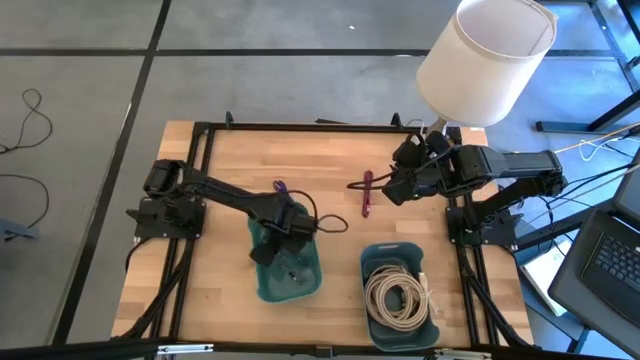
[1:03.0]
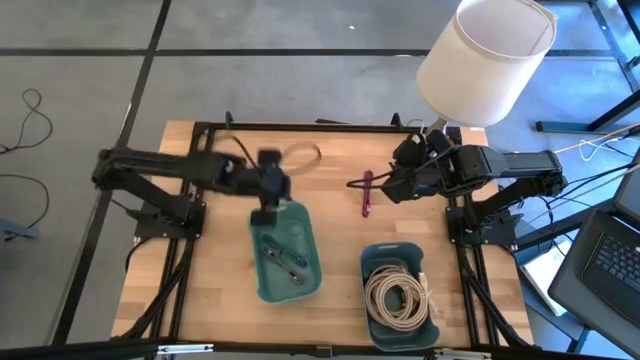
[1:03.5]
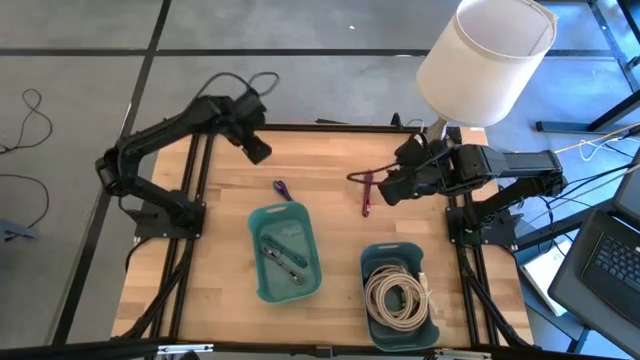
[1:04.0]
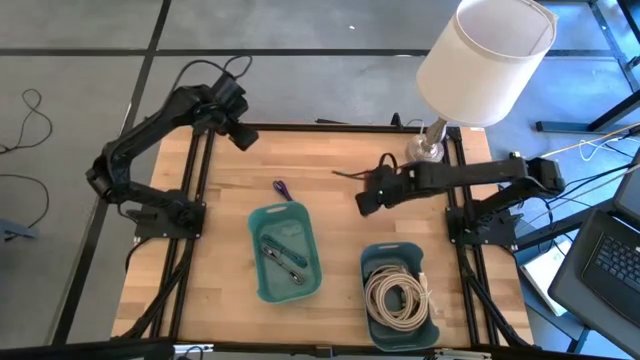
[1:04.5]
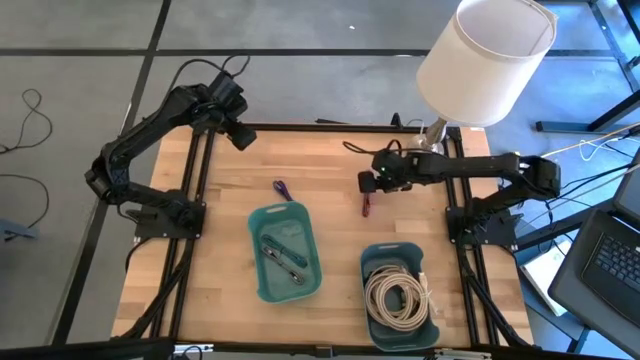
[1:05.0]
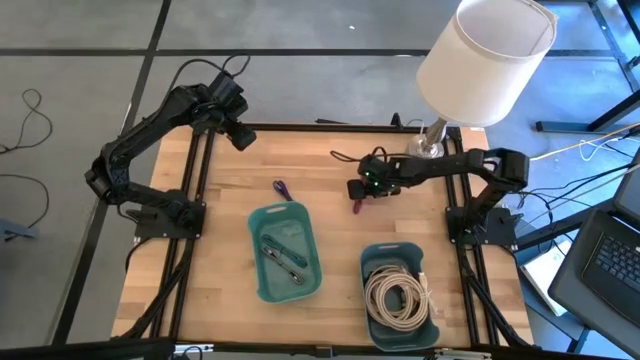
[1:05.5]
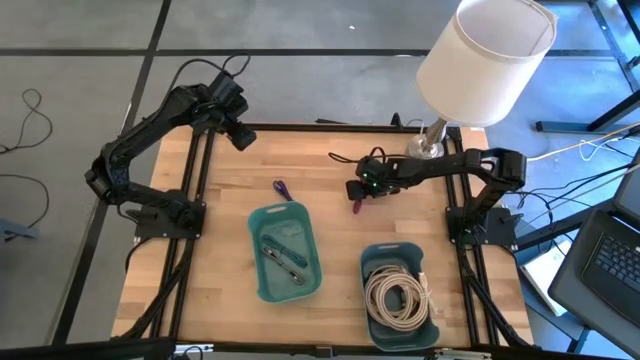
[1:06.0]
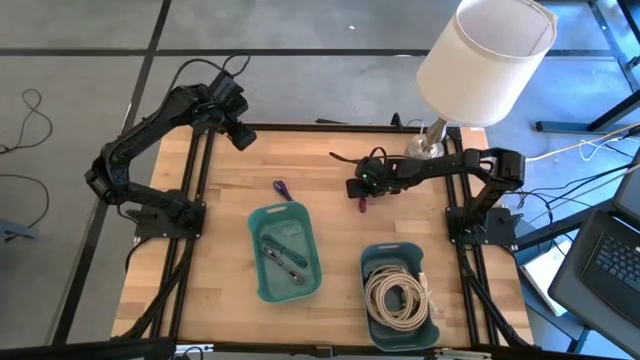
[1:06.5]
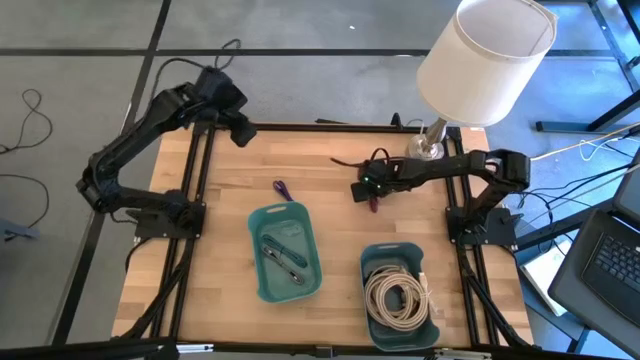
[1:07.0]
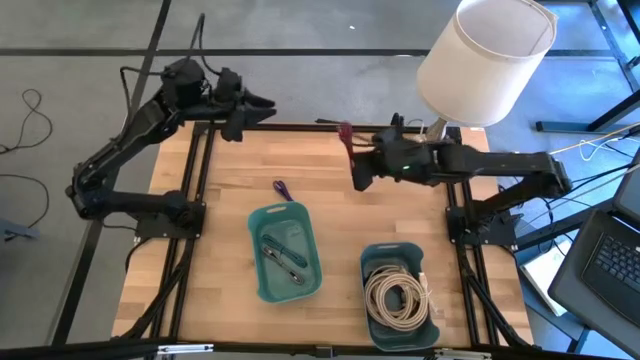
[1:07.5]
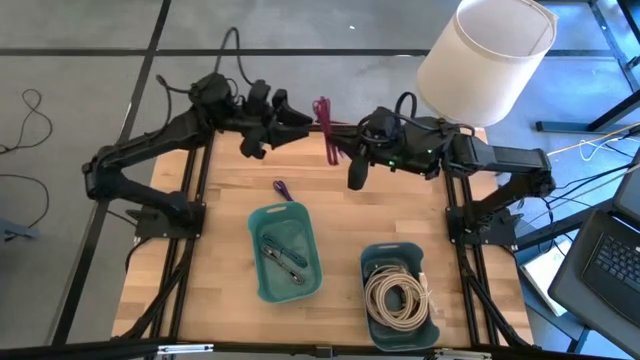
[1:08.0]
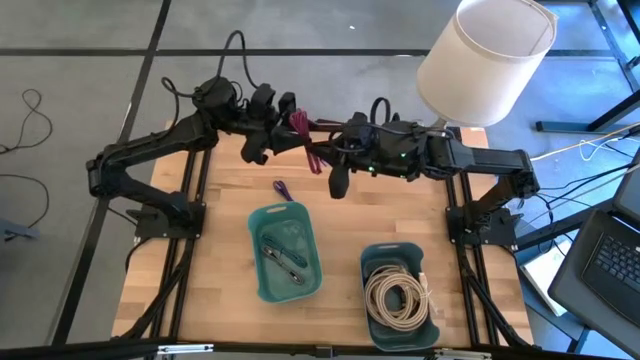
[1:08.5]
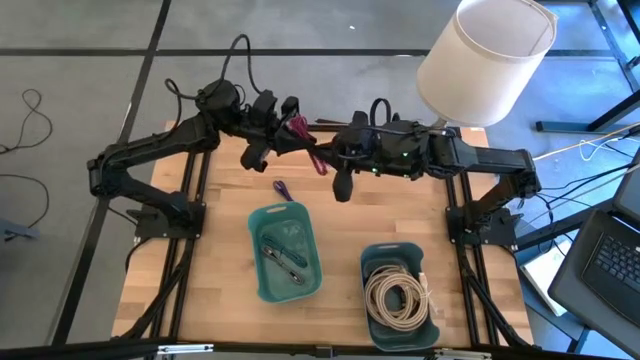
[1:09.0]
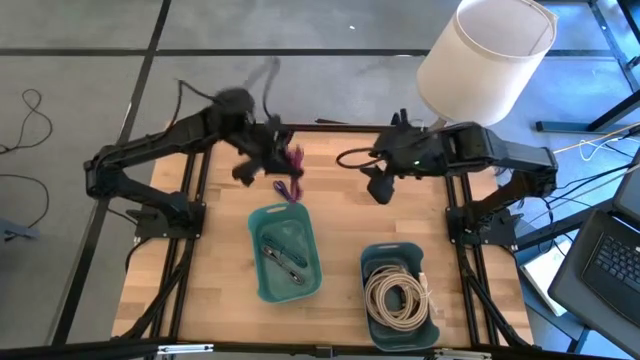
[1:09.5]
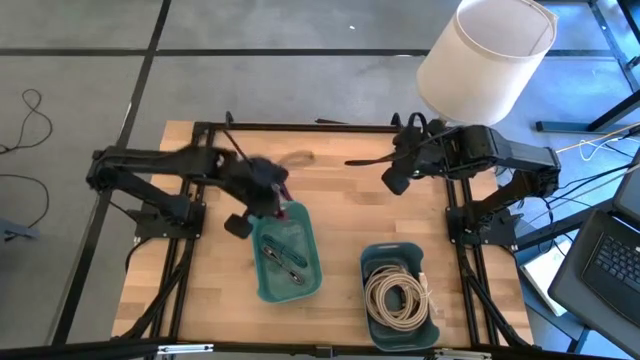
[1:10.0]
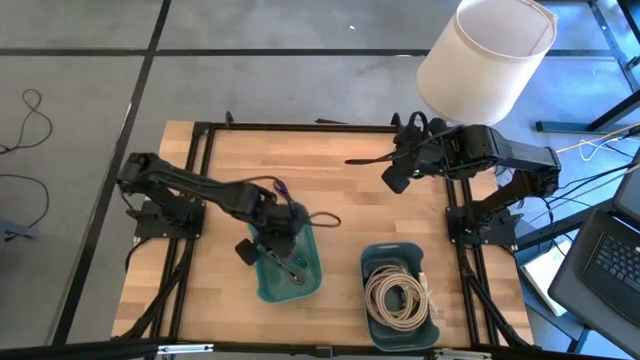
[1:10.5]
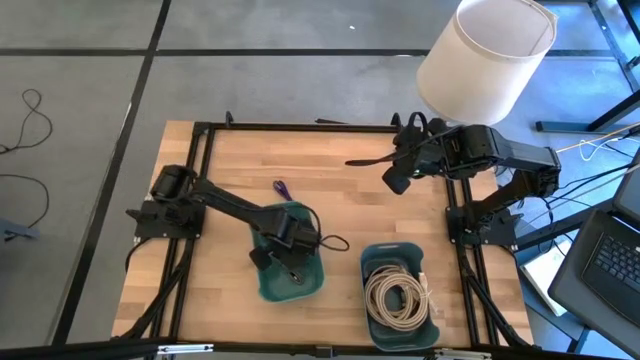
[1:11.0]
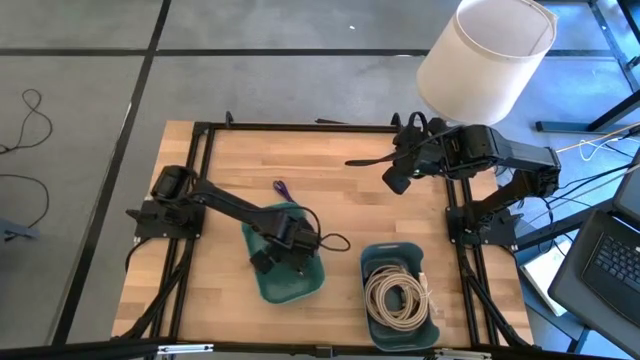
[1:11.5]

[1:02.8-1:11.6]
Task: Pick and place USB-C Cables
Put the black and pink USB cable into the green bin

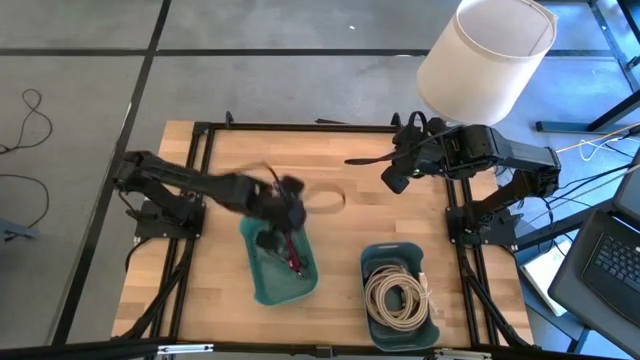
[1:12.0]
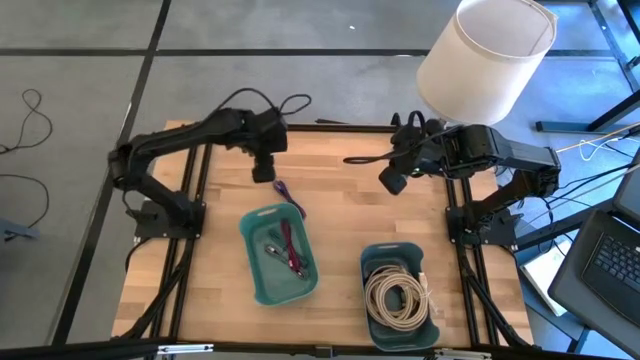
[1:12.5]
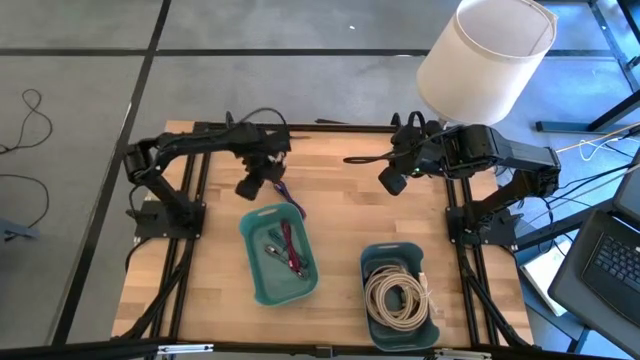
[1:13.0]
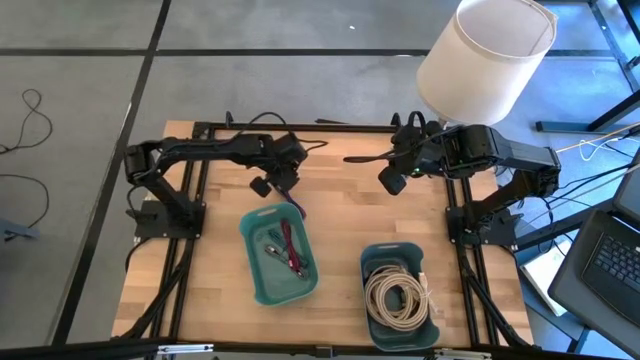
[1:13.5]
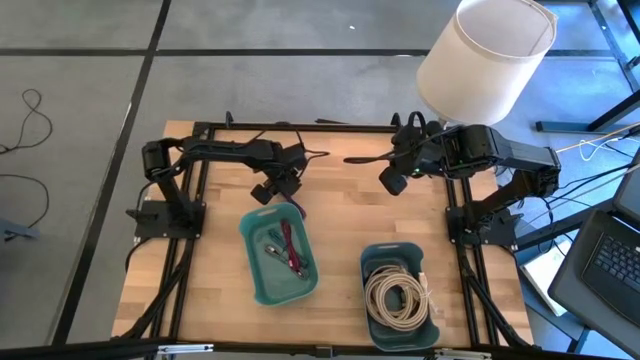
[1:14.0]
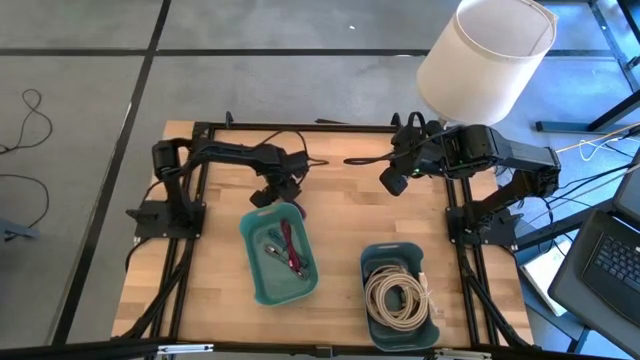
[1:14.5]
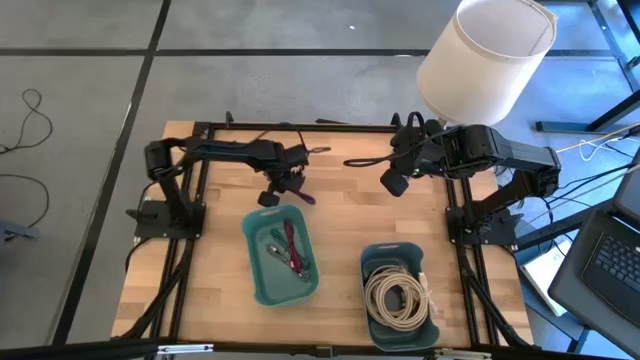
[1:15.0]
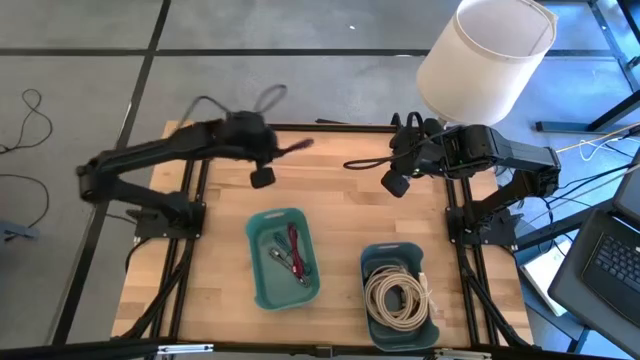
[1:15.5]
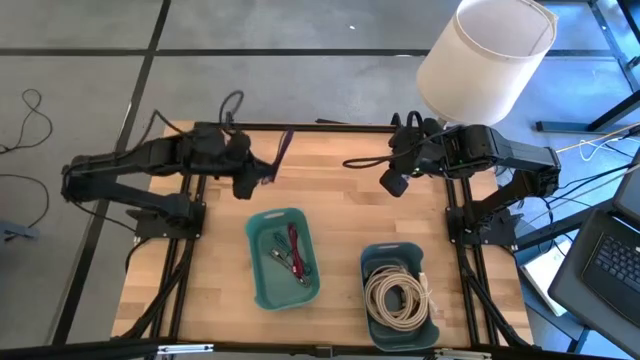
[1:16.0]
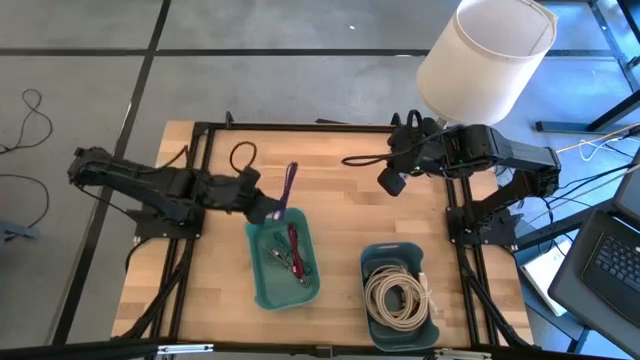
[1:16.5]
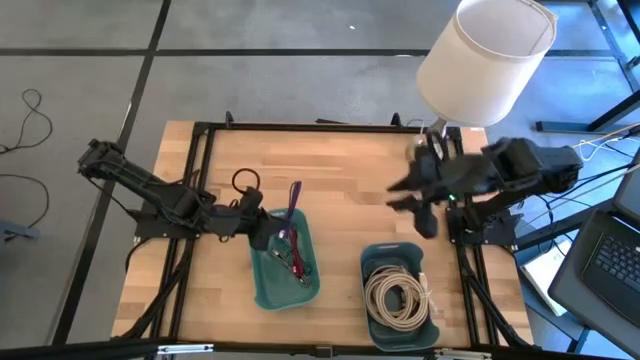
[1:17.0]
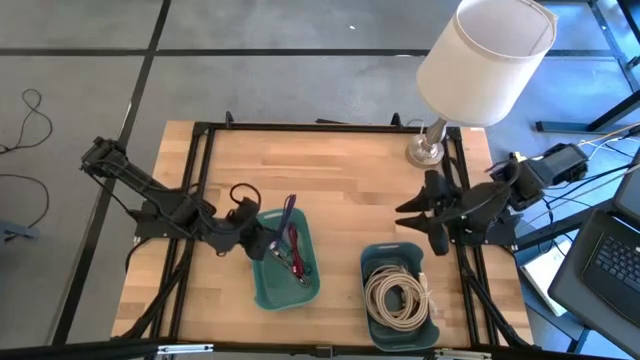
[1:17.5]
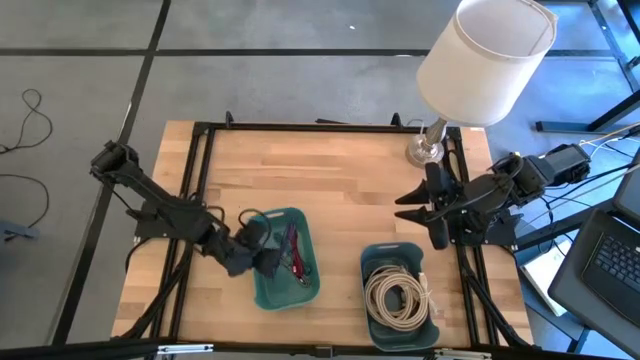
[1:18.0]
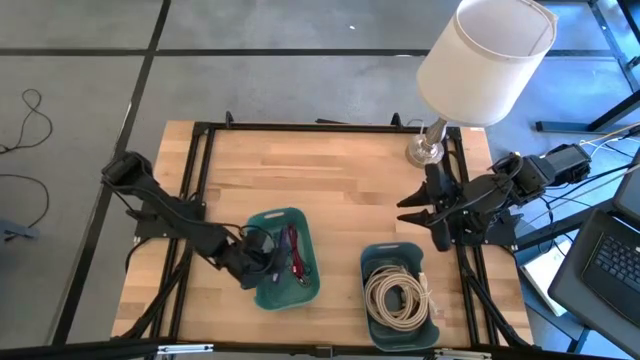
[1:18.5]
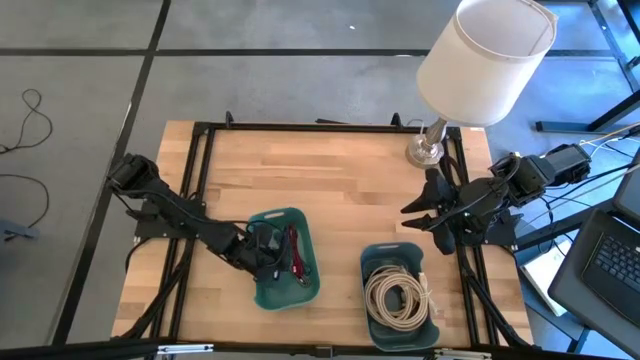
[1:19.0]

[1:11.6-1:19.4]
Put the black and violet USB cable into the green bin

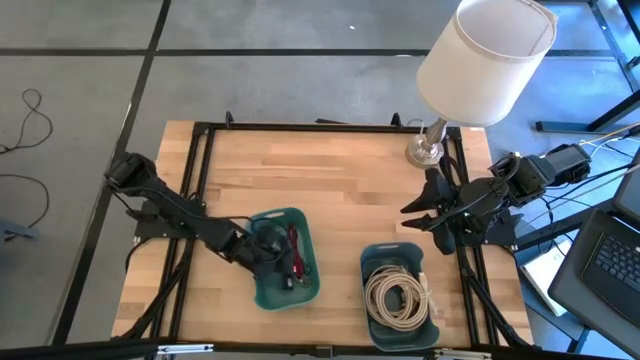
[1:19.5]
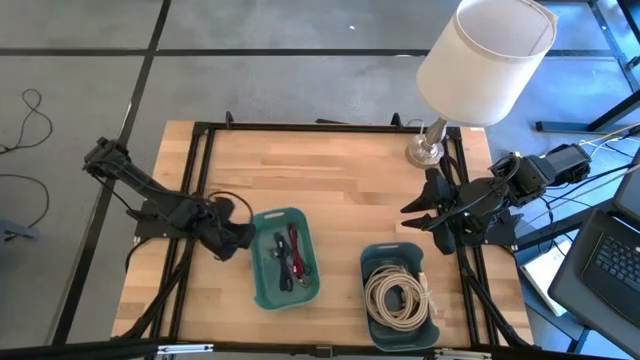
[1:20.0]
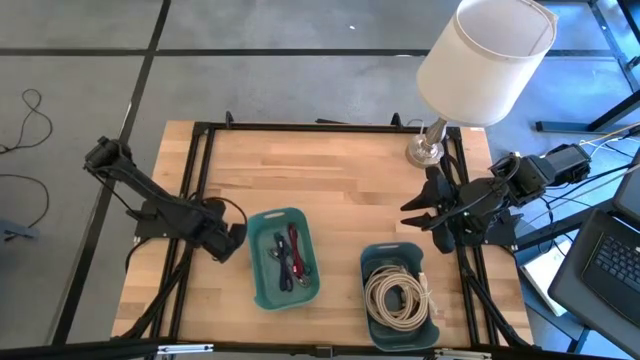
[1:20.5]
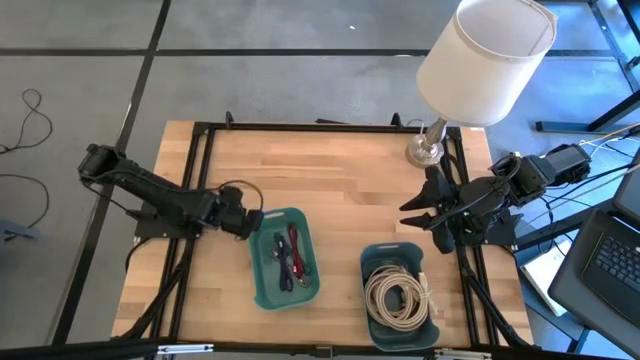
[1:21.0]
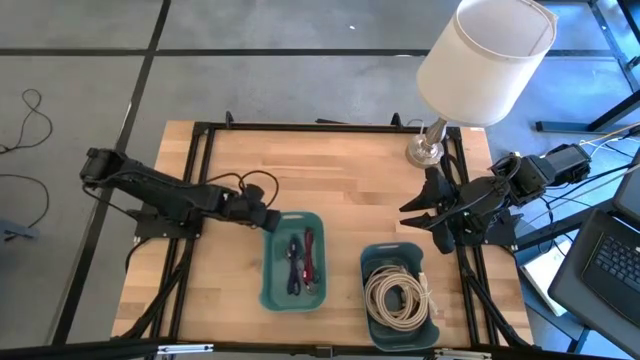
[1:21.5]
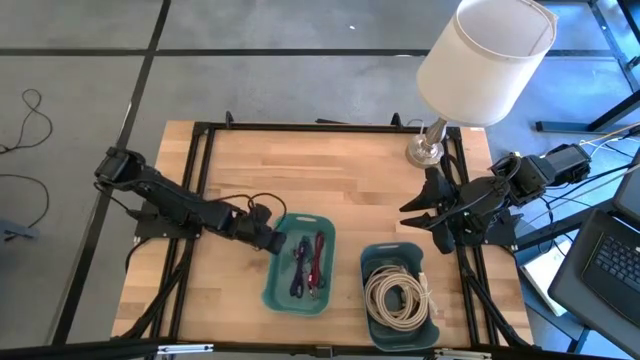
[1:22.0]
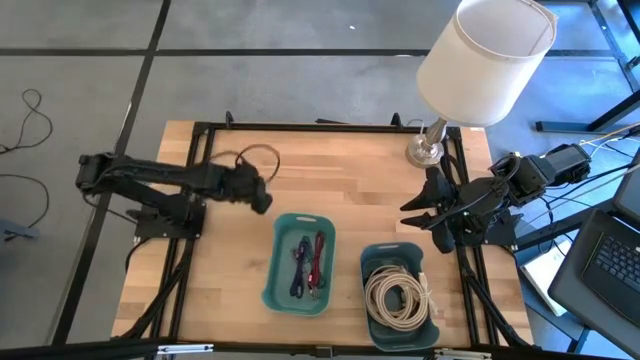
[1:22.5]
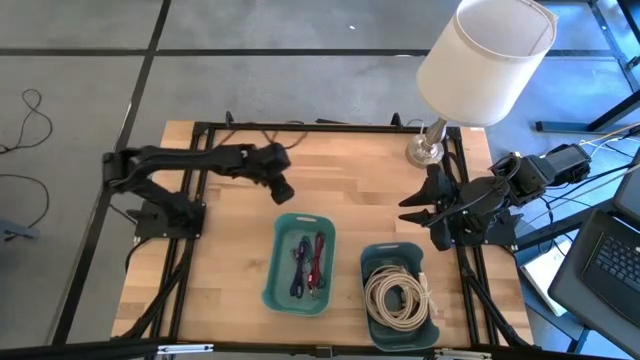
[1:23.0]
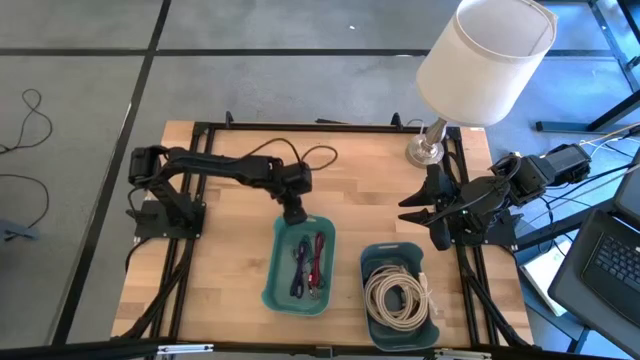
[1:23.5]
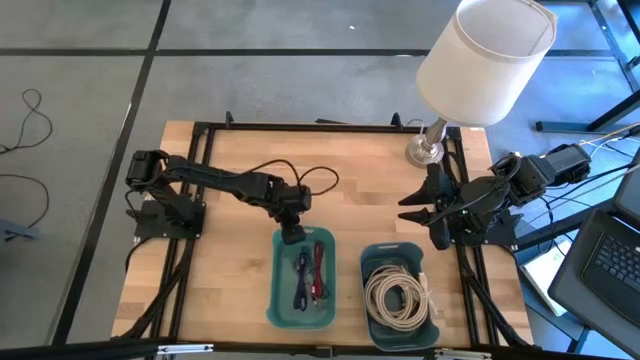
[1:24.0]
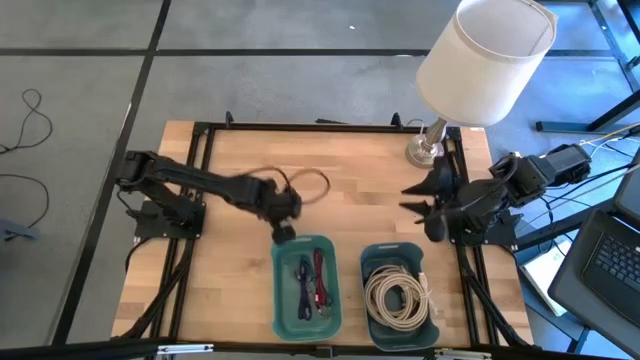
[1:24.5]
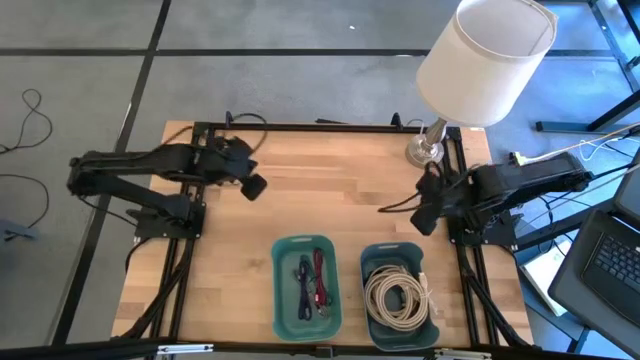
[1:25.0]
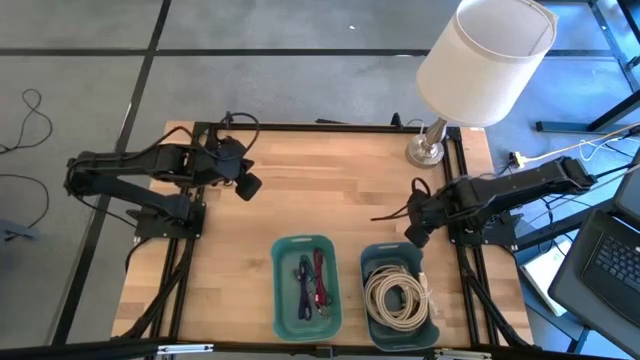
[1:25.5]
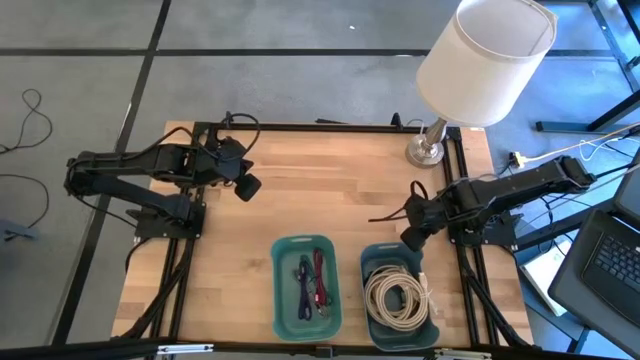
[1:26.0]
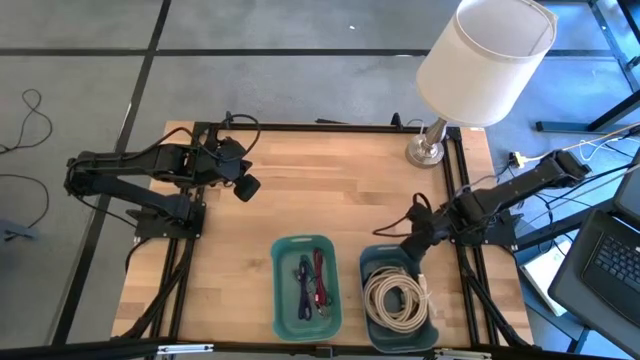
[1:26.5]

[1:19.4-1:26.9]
Adjust the bins
